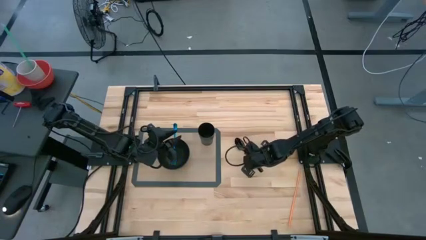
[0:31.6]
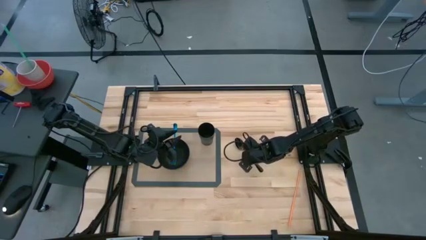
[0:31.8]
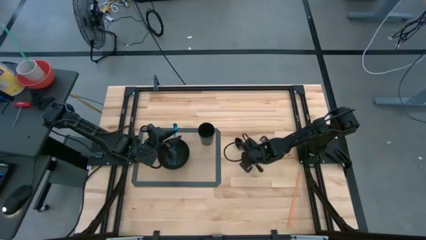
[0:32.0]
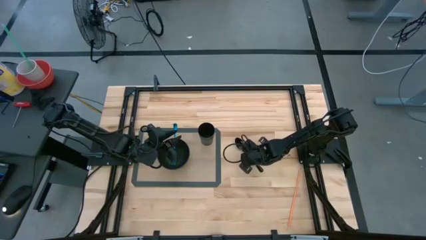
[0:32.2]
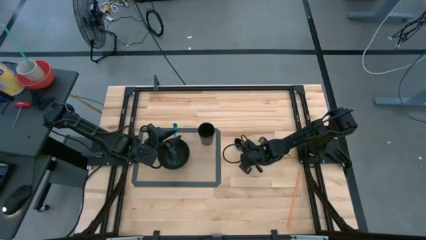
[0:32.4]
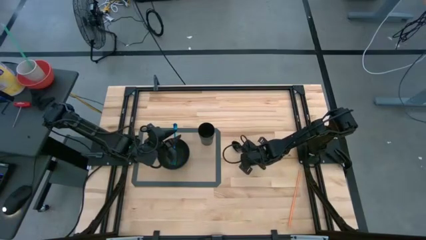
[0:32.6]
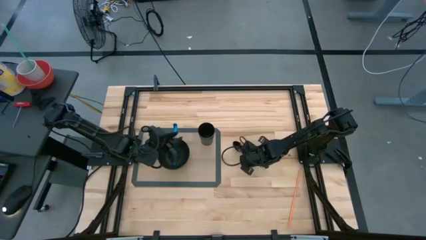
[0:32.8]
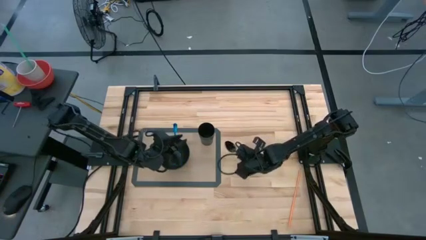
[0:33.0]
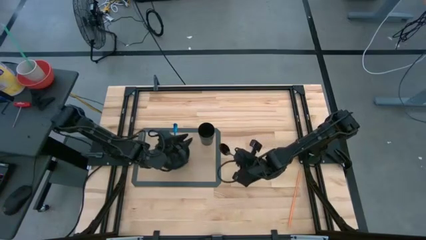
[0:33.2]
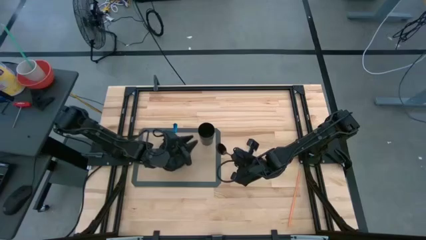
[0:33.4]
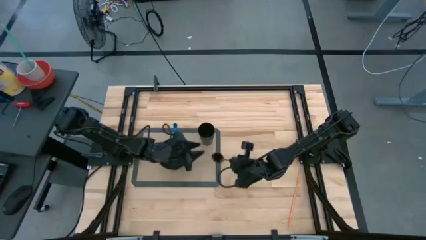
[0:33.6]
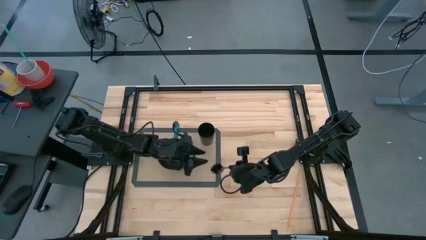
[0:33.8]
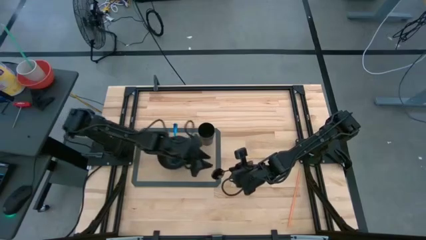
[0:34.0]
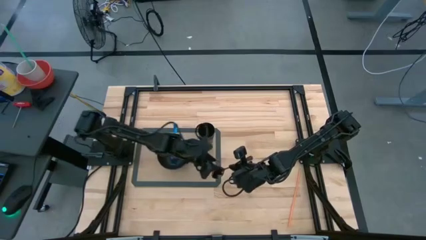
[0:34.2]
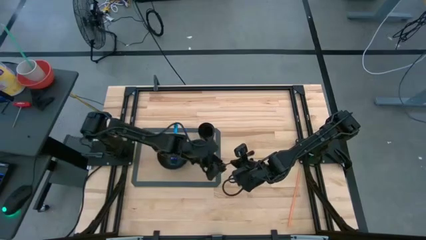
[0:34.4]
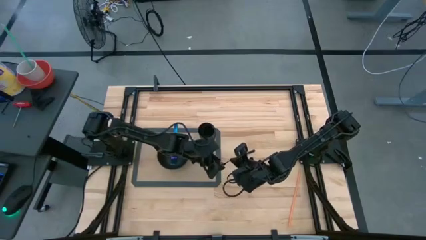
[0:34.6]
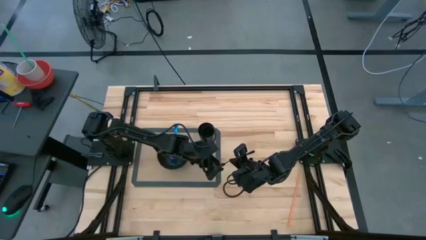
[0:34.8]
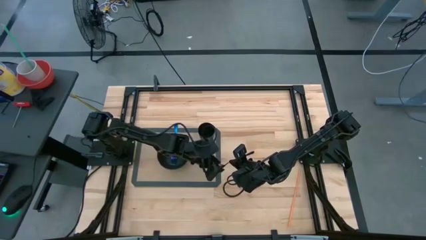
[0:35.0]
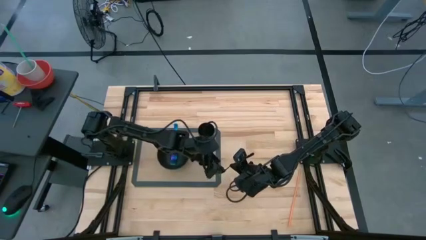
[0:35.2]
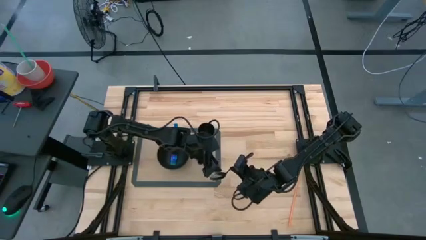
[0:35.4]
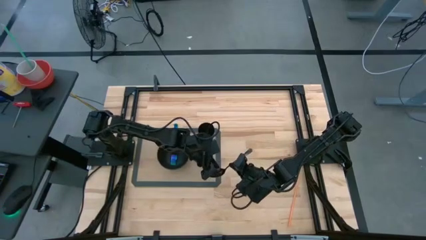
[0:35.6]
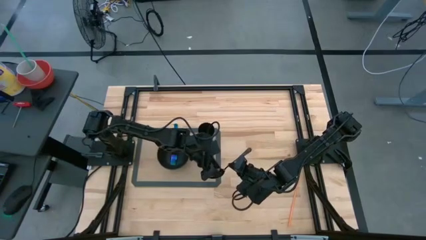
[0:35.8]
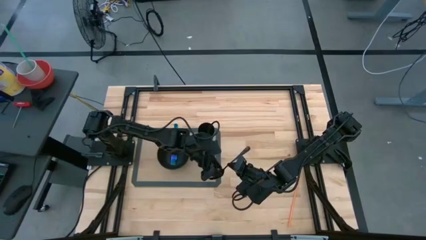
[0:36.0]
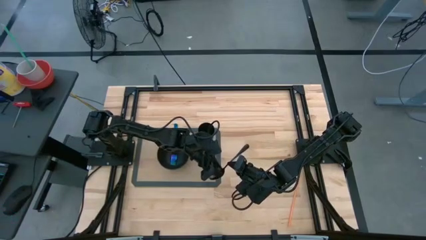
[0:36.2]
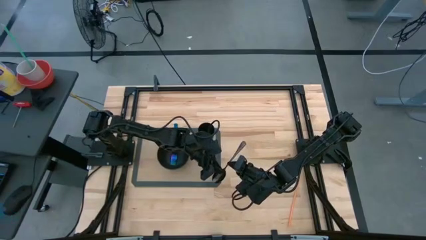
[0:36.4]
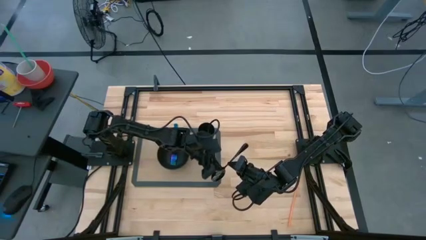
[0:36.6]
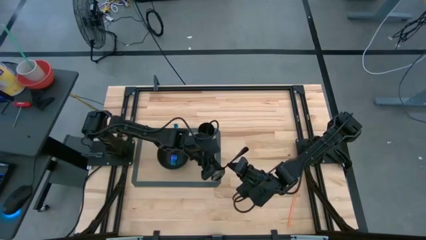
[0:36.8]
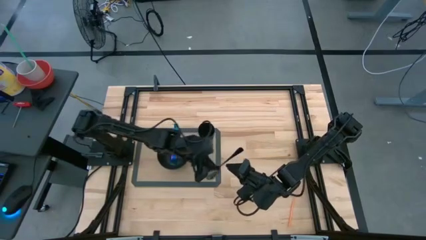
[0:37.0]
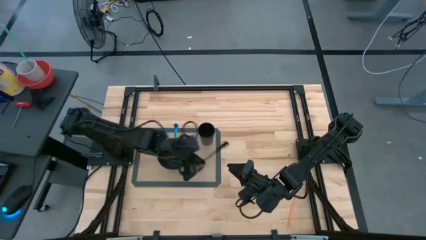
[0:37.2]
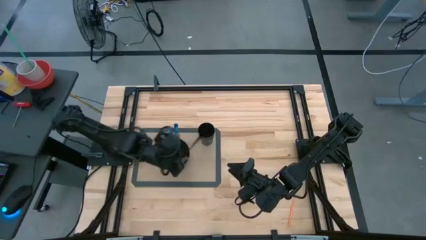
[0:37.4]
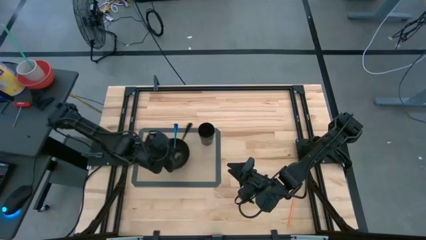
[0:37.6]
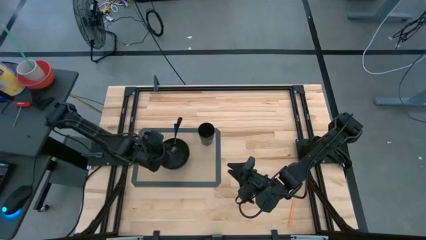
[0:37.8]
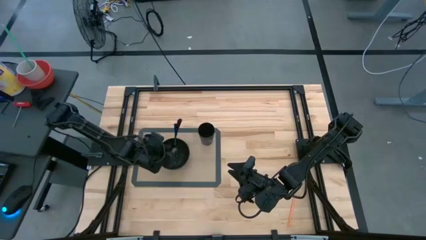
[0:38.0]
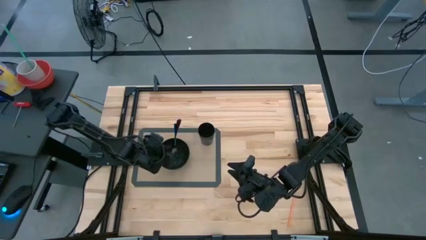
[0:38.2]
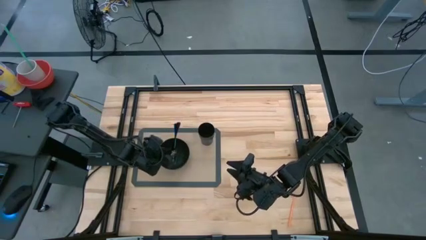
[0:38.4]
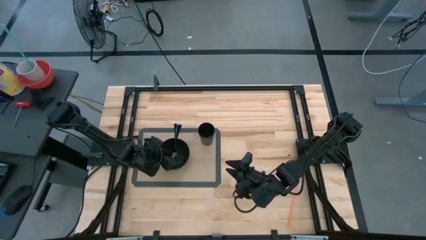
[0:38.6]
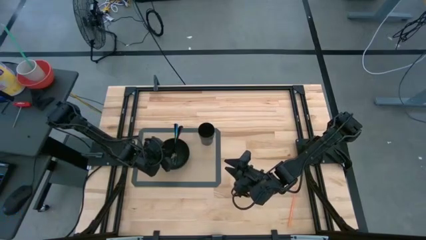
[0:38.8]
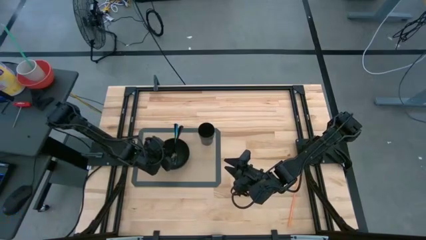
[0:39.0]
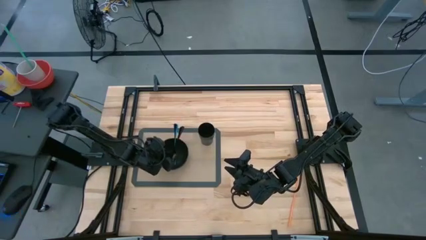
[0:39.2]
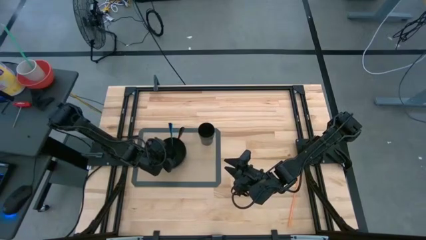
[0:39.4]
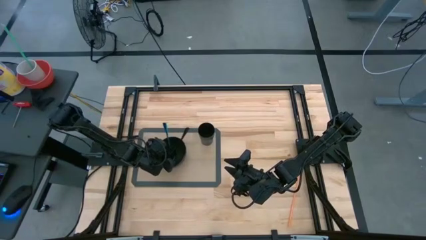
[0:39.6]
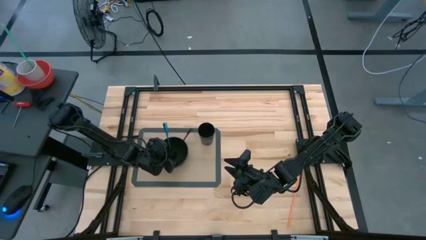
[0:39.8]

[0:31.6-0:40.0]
Task: Pick & Place Utensil
Put the black spoon into the black bowl on the gray placemat

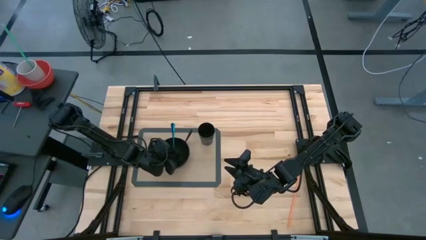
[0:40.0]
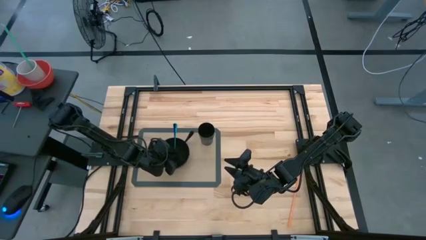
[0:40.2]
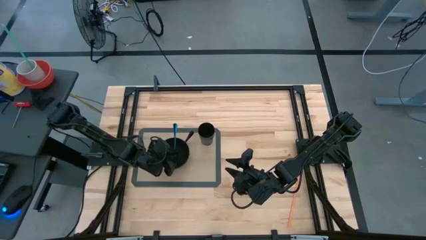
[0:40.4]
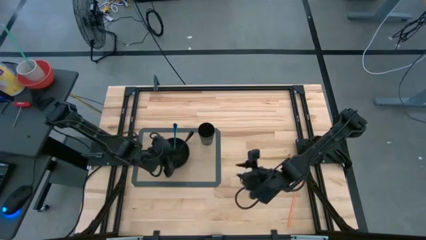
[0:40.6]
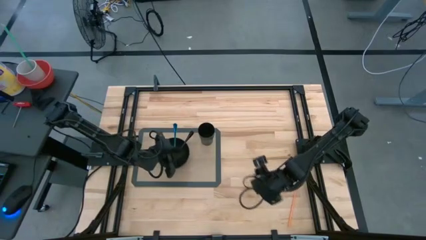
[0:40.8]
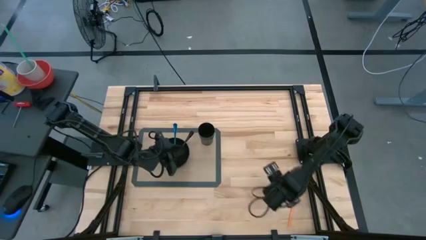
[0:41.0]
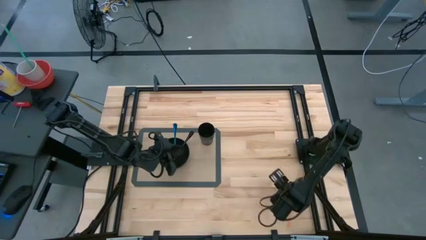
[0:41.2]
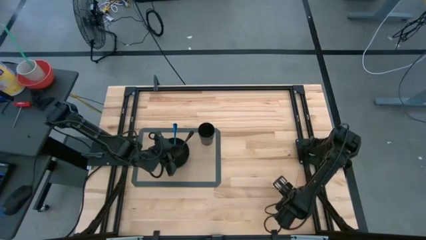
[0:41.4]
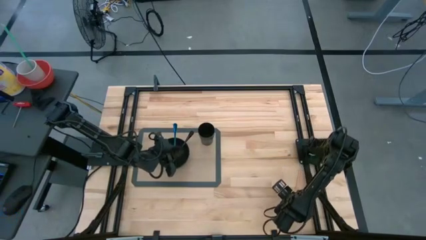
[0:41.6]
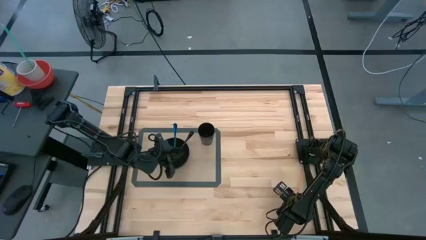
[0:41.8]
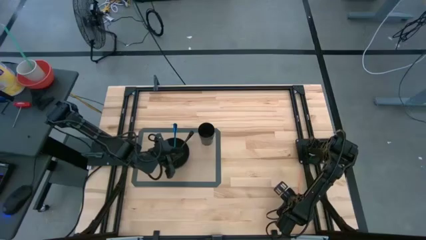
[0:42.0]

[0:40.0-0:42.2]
Put the orange straw into the black cup on the gray placemat

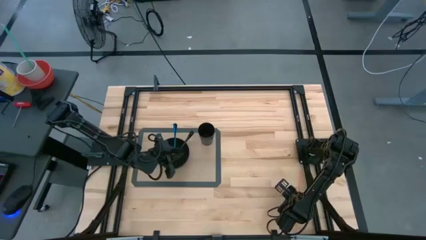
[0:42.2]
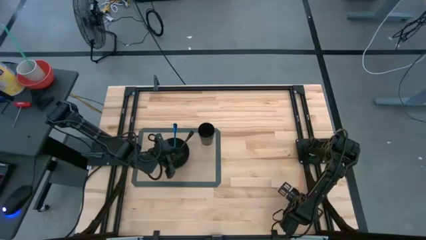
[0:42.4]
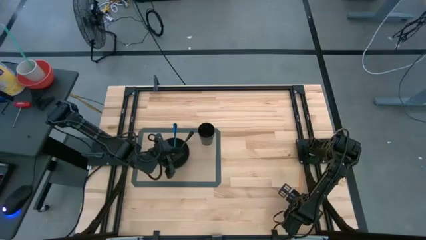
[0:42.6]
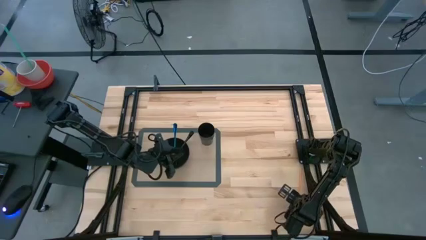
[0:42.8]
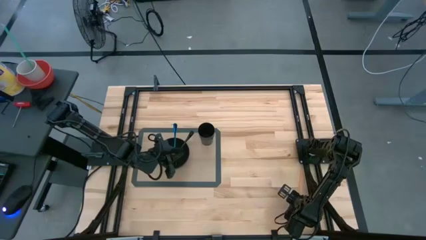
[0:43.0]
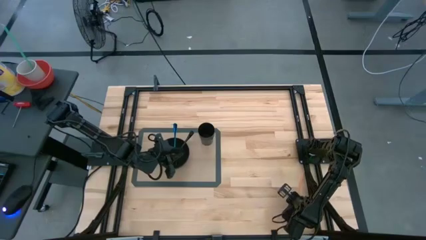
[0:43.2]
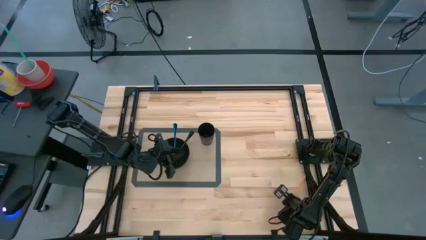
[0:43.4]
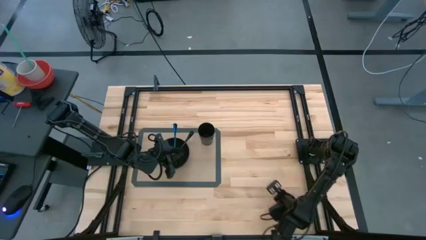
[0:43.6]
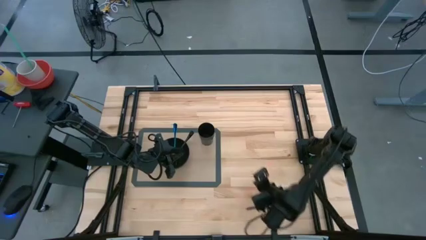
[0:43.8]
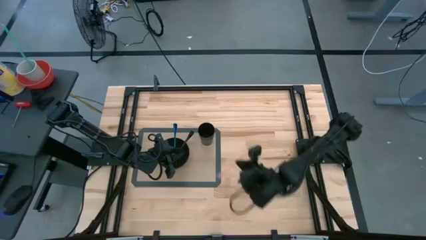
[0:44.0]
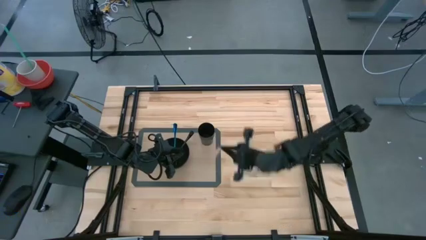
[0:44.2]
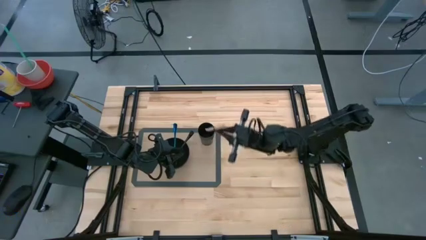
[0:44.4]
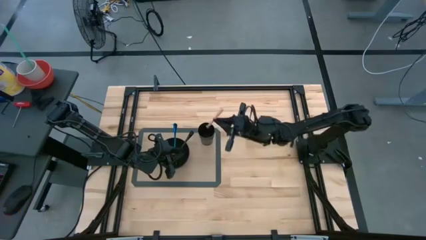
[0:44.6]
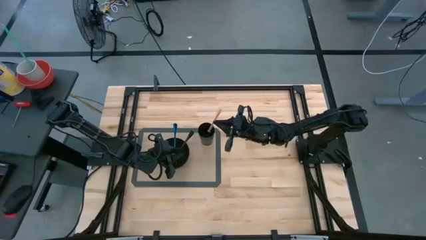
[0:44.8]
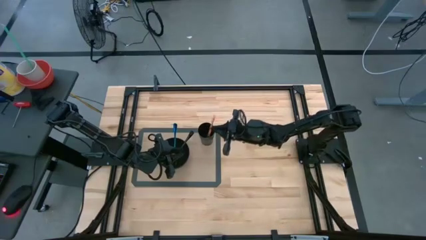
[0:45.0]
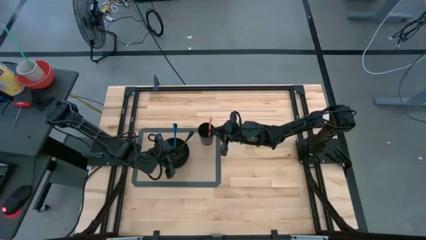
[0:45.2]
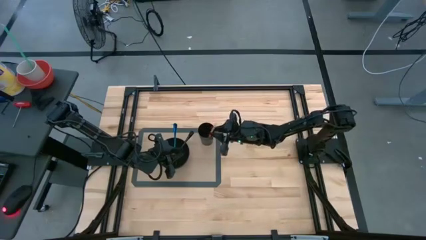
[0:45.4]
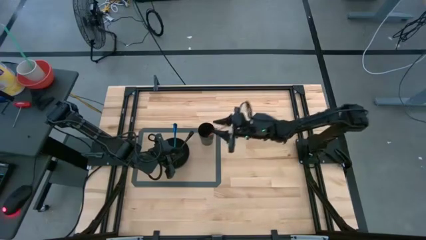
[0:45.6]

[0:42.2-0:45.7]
Put the orange straw into the black cup on the gray placemat

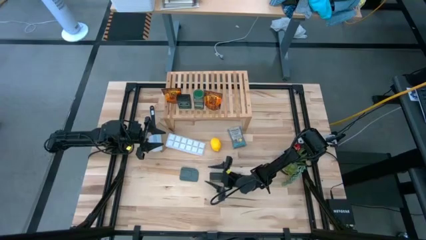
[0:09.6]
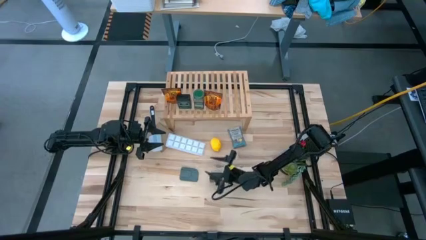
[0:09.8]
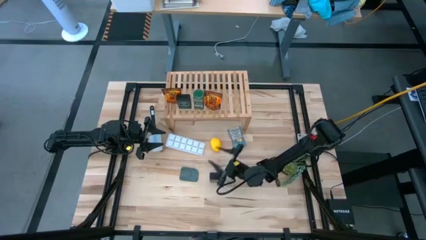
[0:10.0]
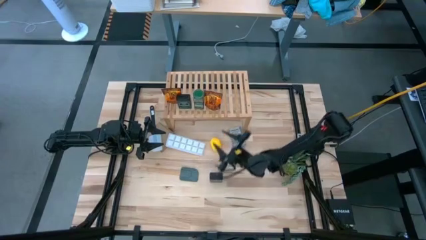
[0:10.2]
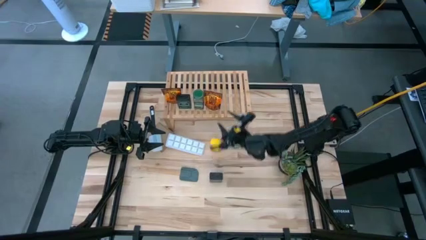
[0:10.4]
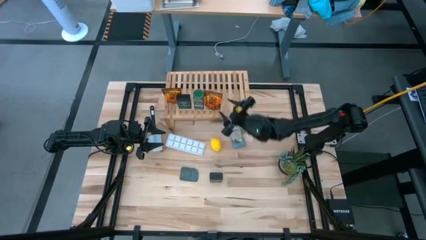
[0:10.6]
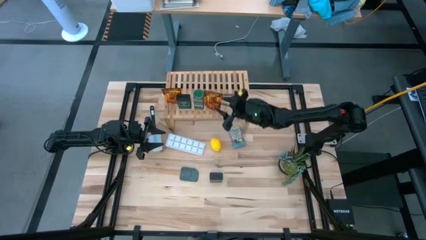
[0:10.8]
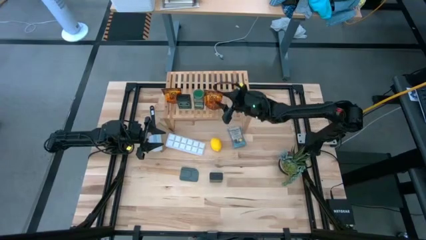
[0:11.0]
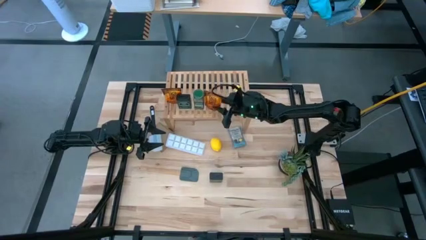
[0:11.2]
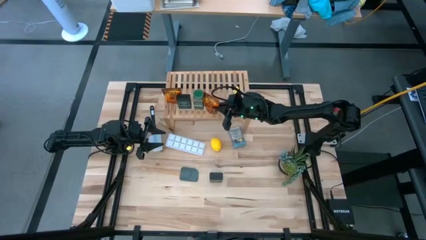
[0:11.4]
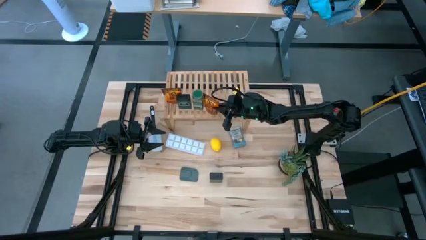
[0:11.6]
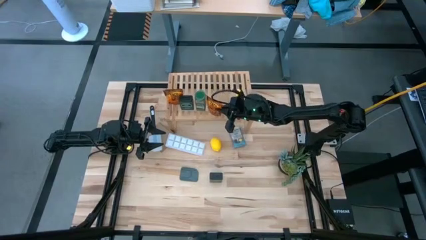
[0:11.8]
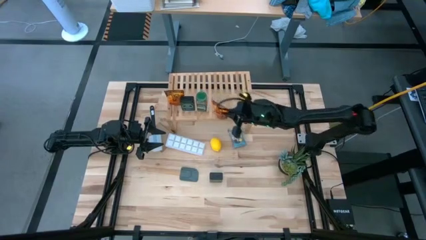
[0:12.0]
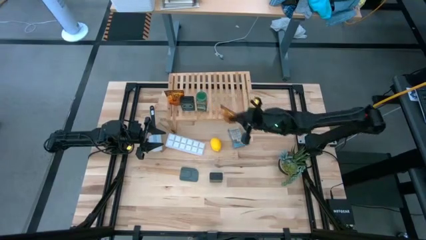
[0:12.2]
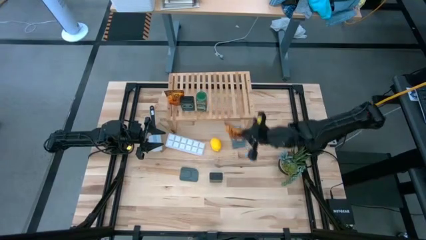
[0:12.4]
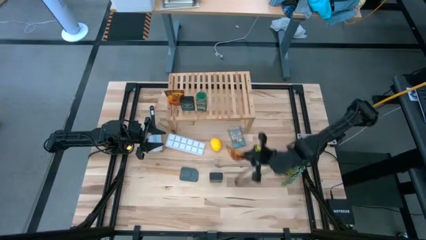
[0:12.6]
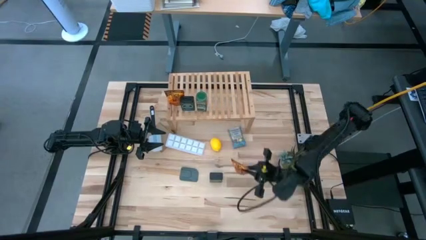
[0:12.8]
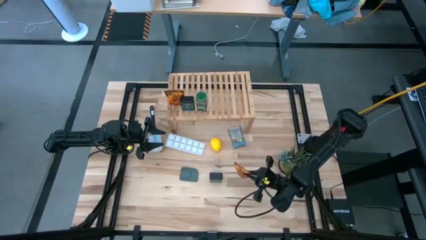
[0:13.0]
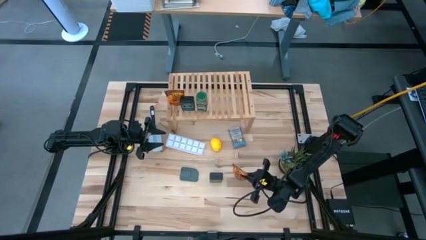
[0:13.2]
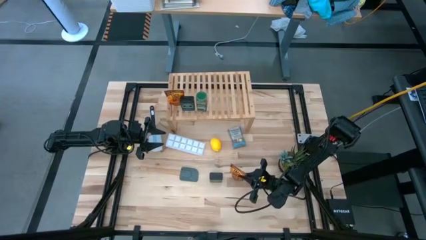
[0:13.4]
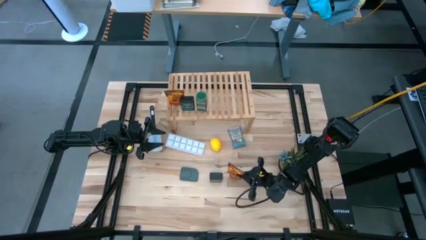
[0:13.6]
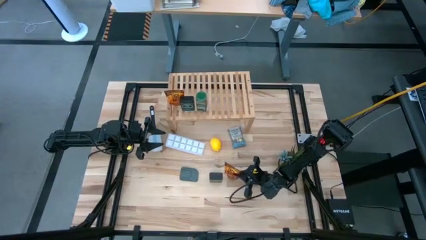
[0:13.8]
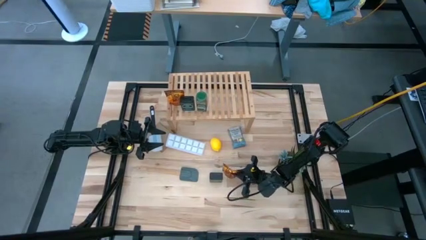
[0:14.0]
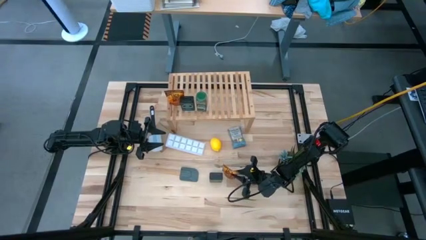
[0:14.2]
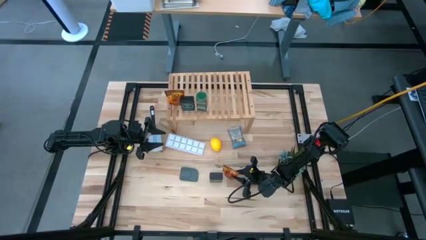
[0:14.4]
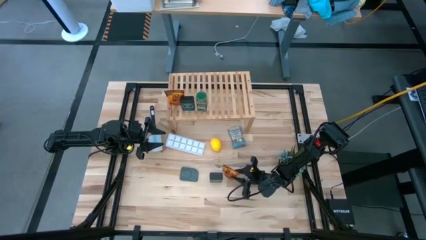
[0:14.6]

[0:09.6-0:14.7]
Task: Shelf spices
Remove the right orange seasoning can from the shelf
